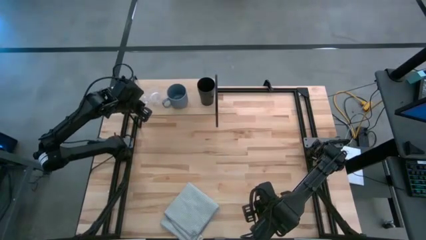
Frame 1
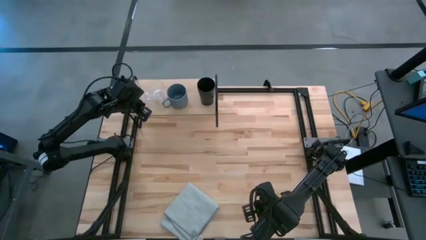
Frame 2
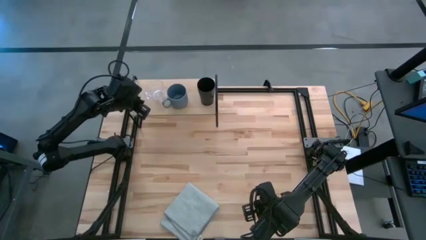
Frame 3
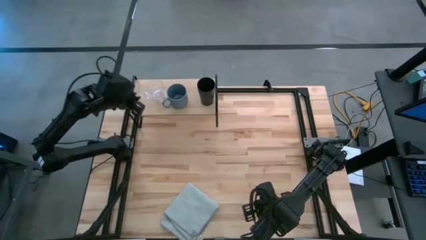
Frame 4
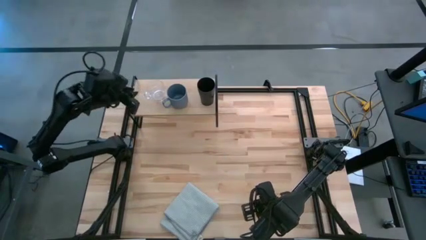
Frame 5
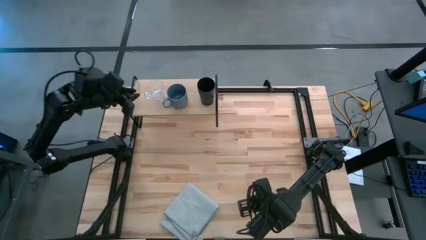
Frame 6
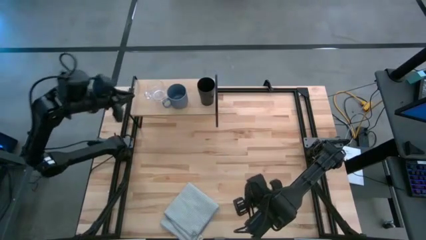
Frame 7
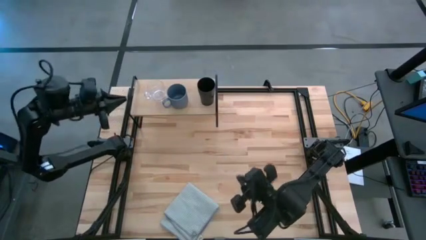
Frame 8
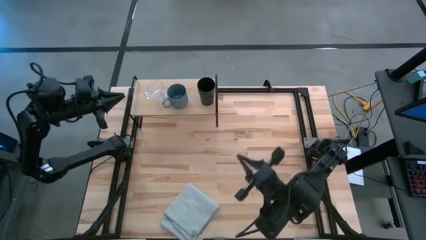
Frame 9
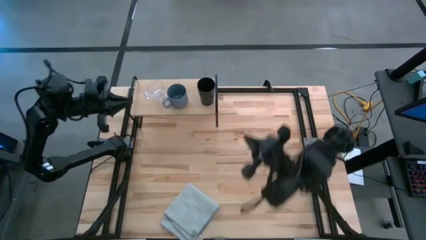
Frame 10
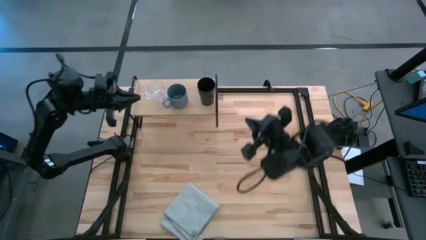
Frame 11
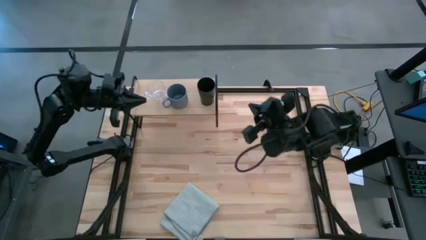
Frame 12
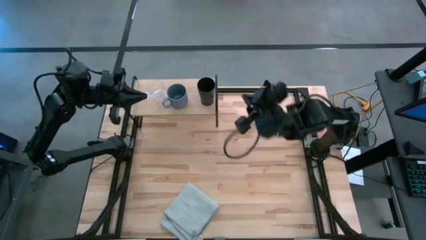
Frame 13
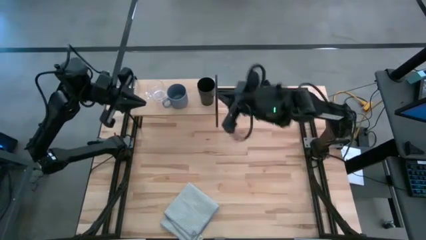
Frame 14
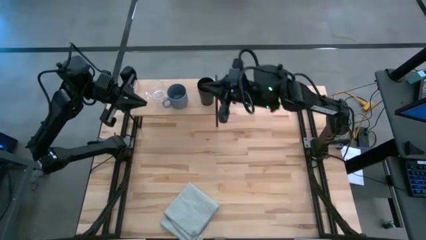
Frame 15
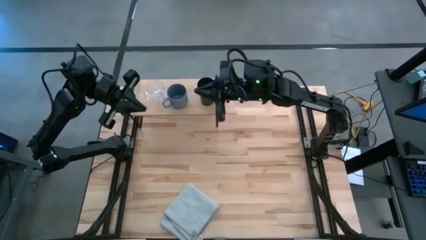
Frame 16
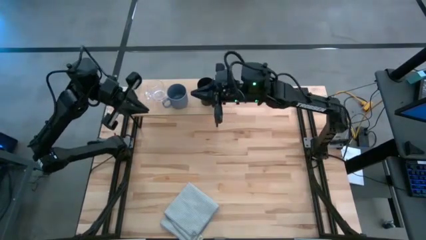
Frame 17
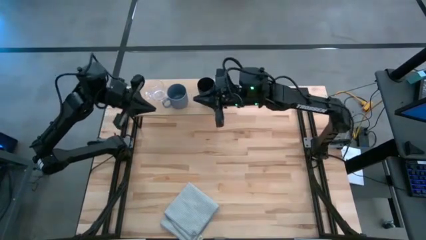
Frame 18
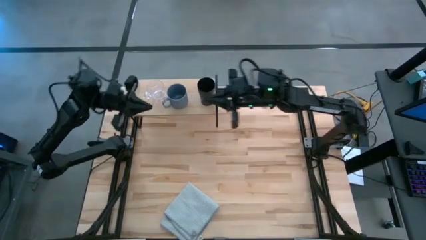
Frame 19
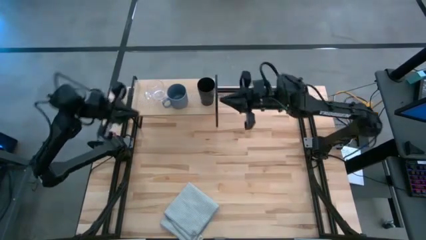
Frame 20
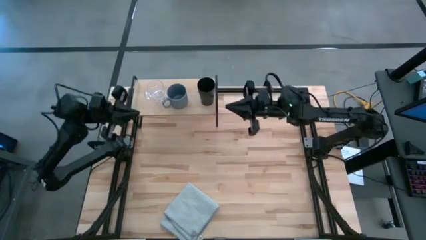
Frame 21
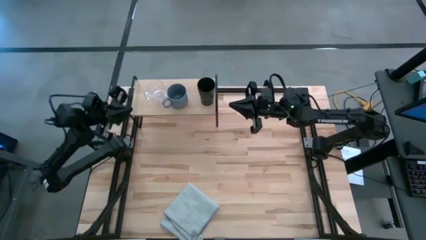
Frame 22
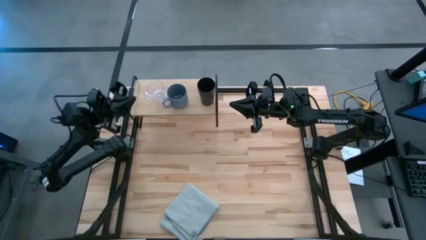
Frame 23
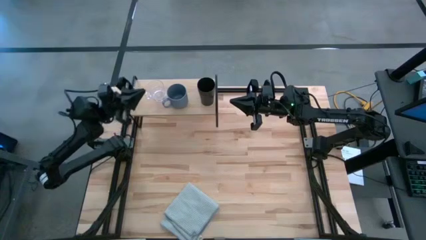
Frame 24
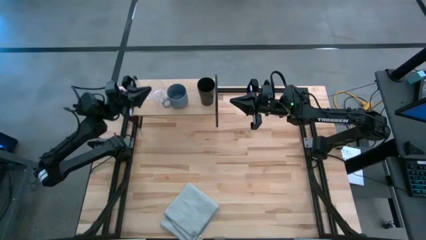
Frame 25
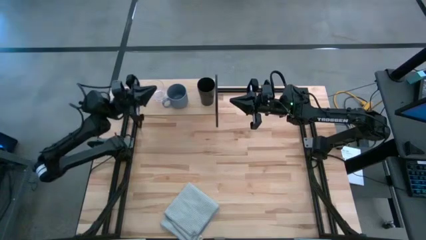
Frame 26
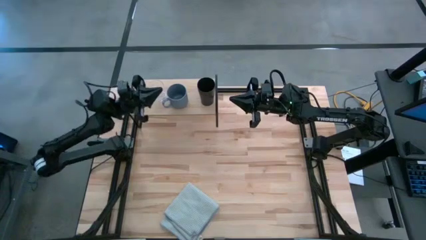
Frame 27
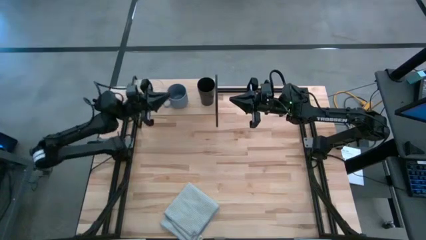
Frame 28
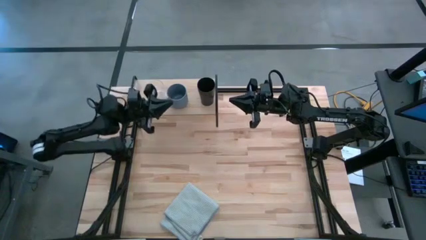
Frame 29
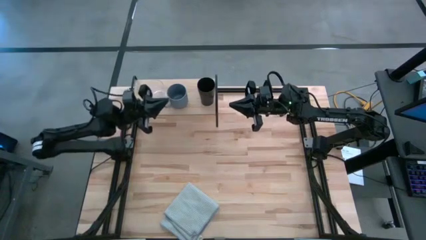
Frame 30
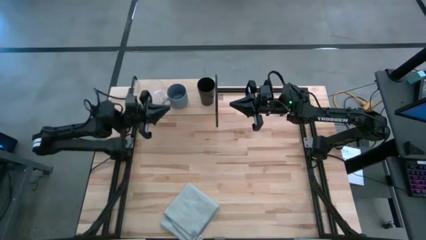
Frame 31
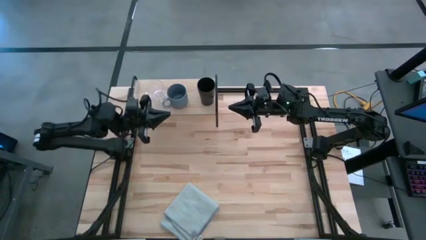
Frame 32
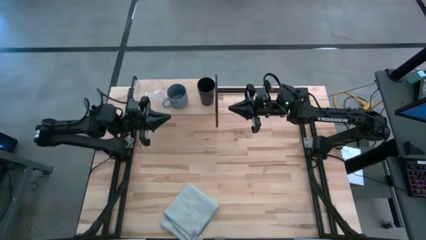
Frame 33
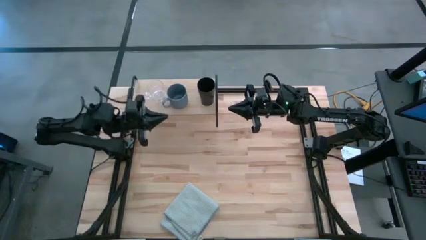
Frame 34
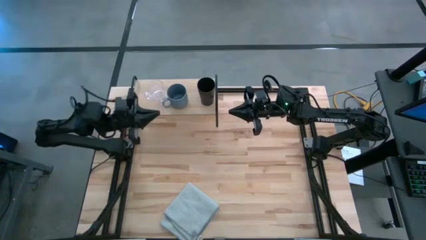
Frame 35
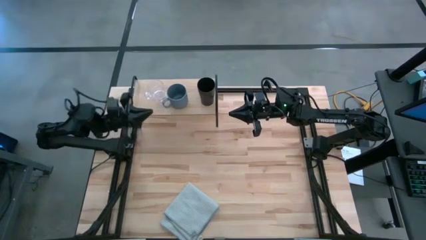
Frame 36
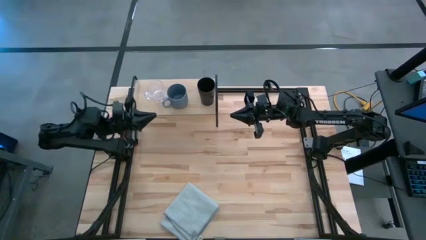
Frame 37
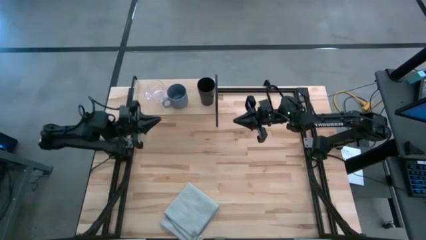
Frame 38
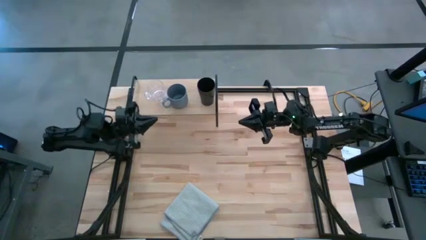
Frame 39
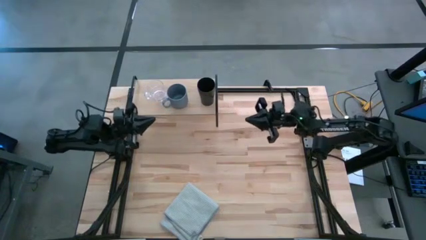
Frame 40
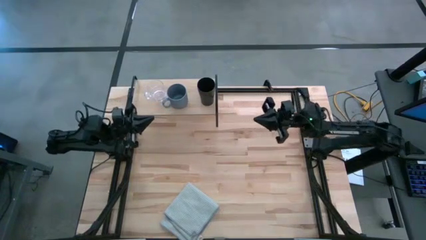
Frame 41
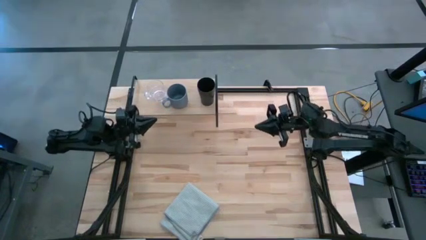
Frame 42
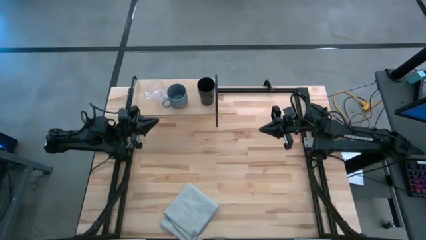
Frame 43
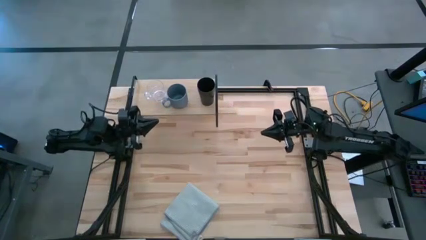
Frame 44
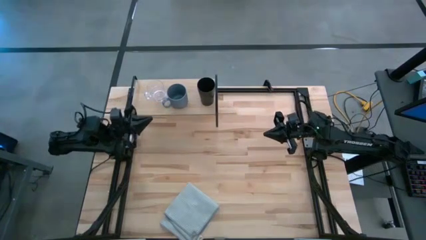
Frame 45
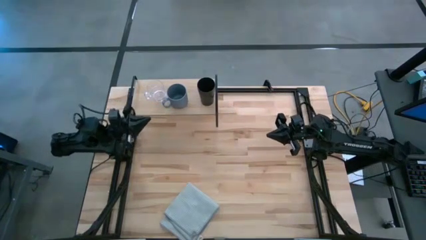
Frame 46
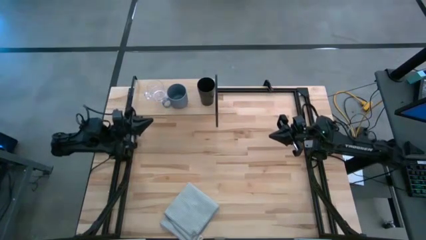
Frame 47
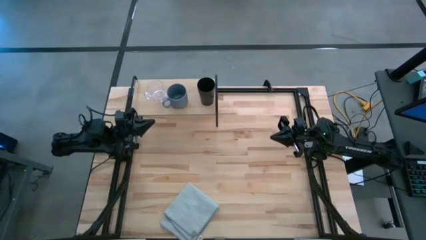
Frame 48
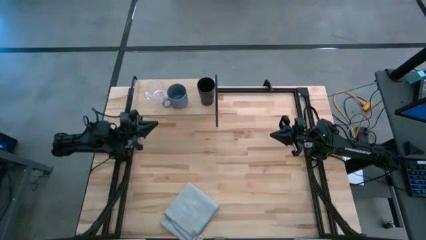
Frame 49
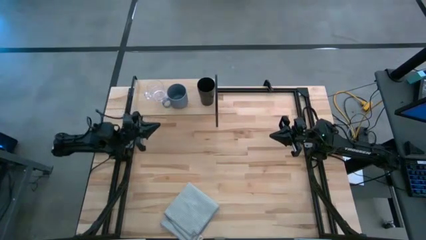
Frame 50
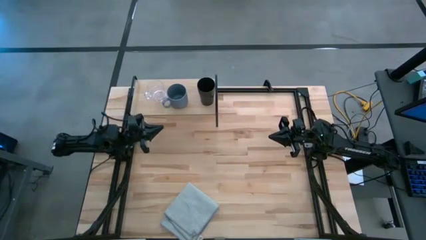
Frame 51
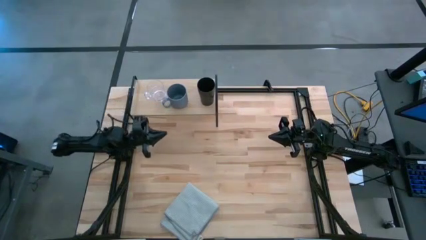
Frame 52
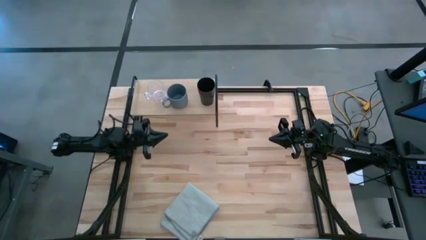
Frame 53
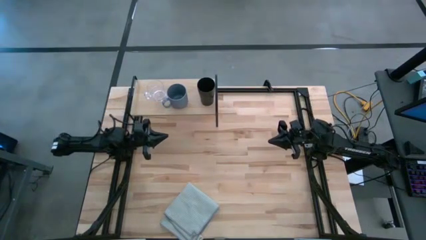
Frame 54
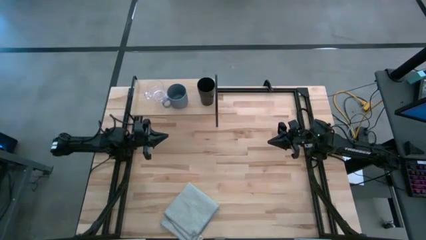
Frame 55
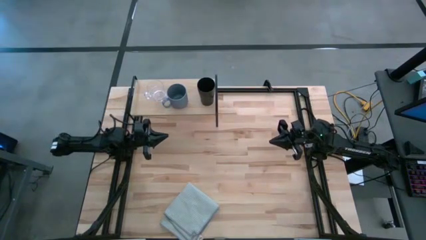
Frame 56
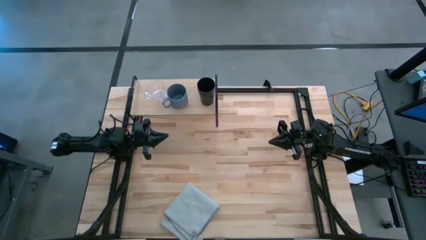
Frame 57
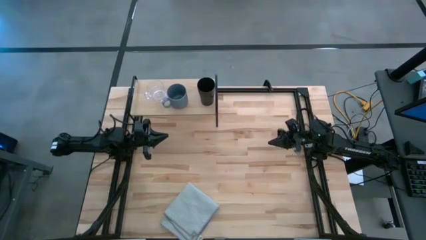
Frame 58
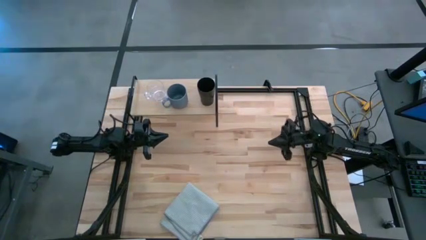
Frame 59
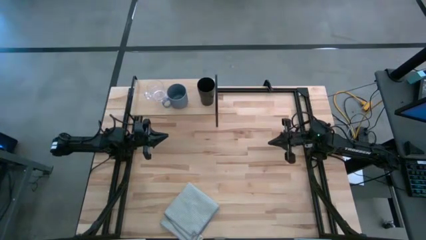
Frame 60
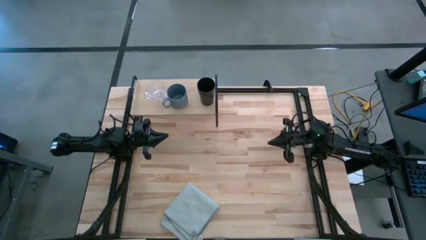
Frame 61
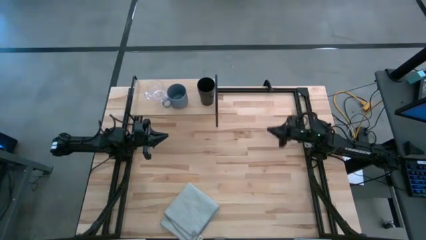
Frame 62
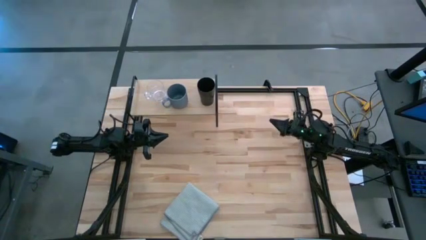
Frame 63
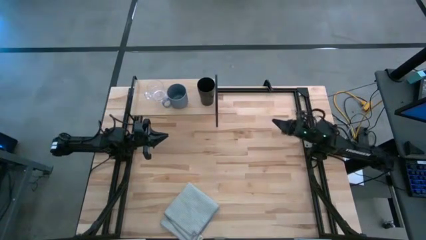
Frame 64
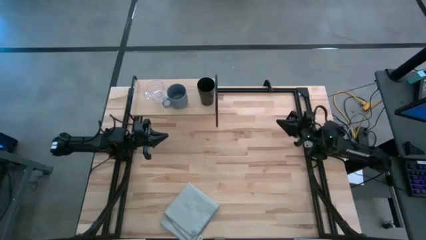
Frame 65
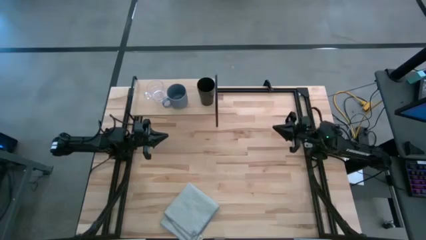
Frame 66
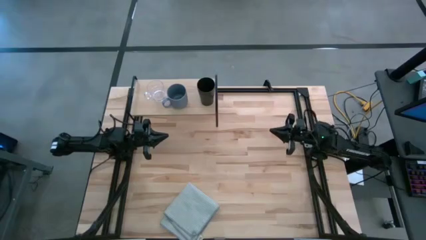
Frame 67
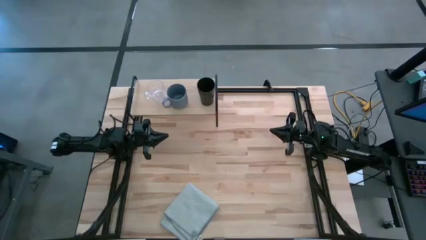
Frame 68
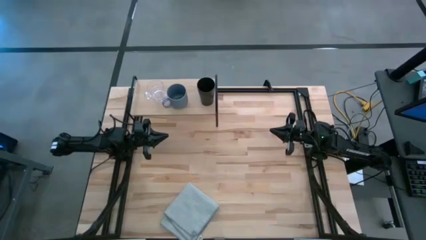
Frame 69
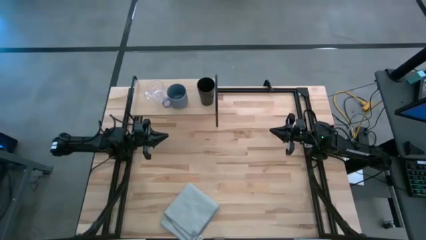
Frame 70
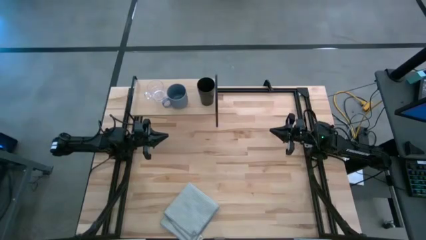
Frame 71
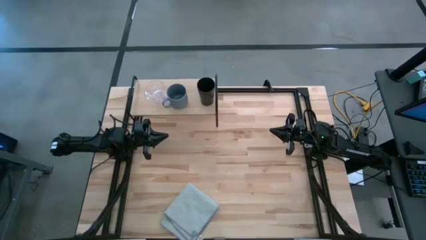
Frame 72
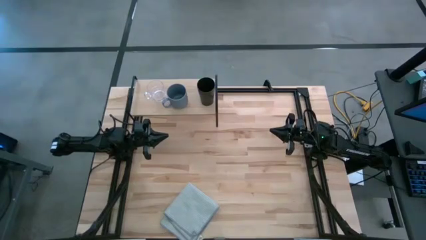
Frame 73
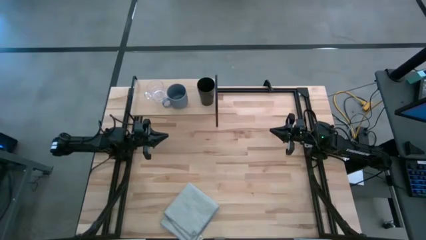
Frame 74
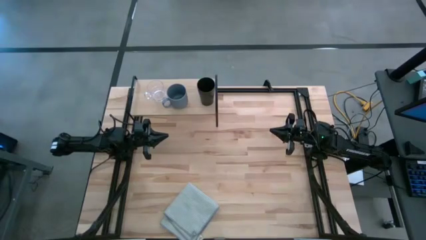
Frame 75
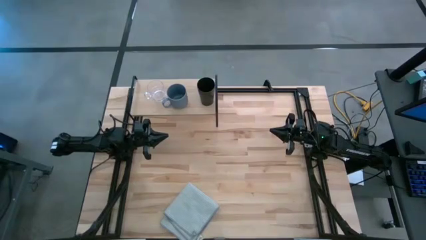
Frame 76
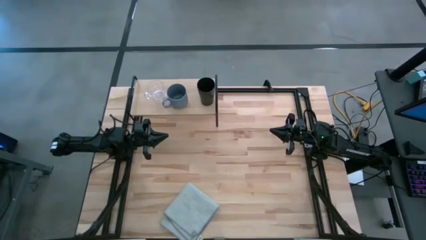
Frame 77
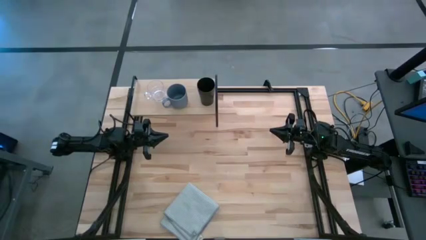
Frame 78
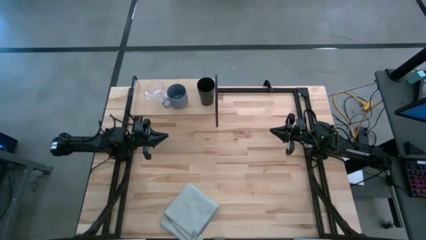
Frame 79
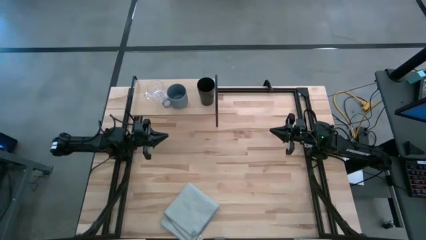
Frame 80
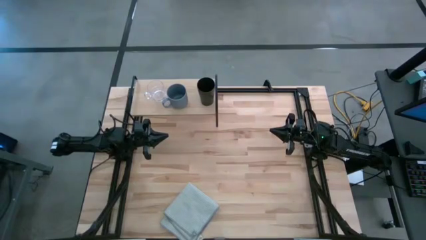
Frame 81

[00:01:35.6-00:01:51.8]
Task: Stack small to large cups/mugs on shelf
Return to Home Position

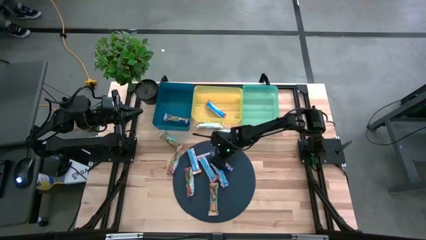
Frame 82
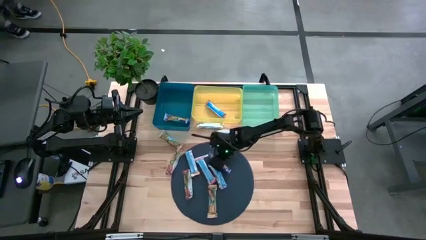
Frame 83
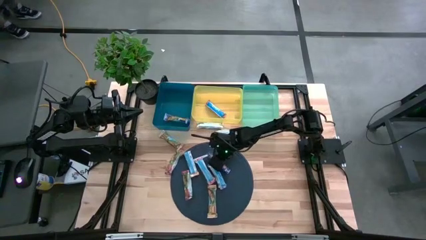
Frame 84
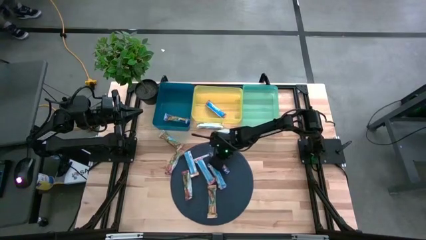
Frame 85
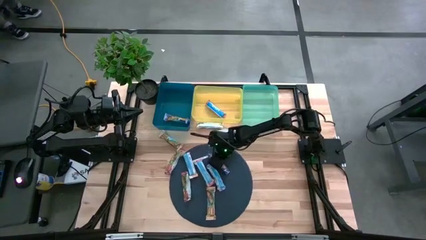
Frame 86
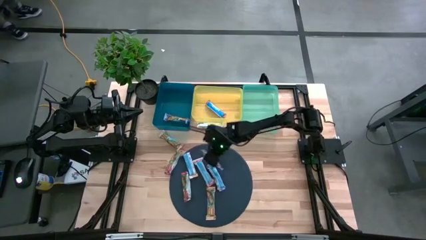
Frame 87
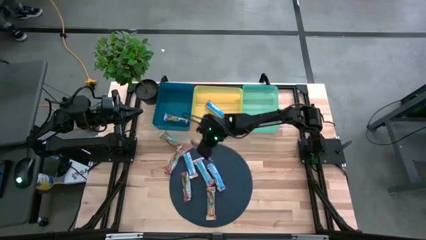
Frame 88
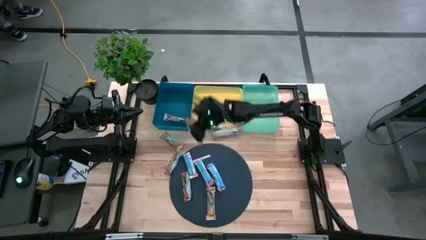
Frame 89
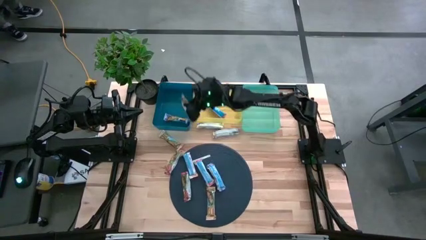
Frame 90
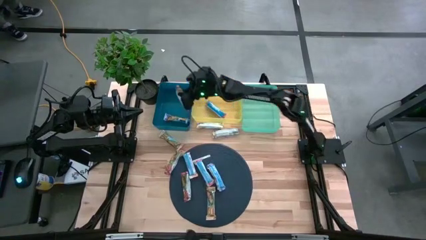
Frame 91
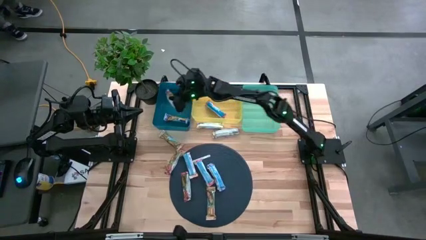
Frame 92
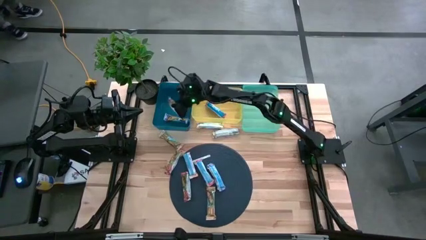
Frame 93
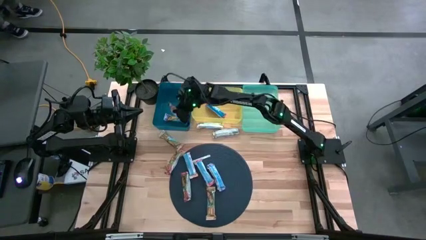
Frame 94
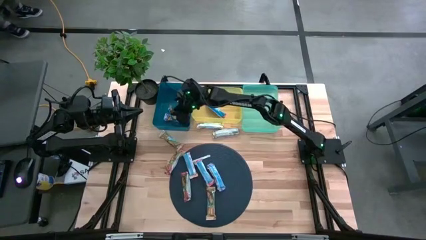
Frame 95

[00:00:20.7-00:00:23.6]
Task: Pick and place Granola Bars by type
Put the blue granola bar into the blue bin
